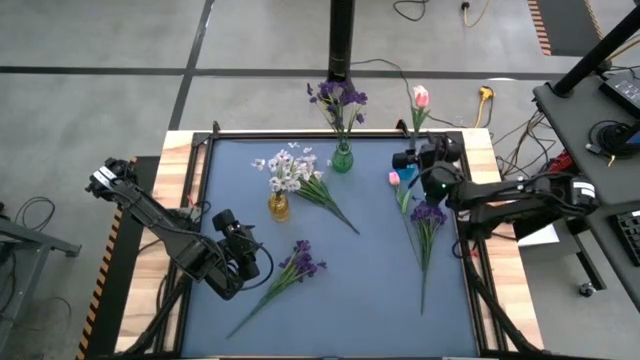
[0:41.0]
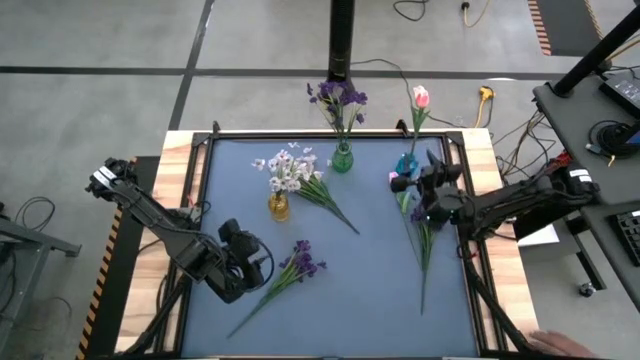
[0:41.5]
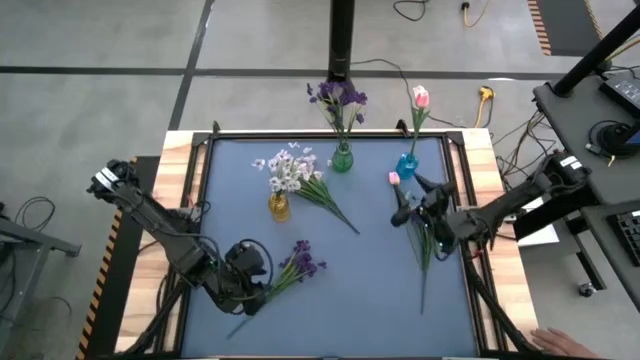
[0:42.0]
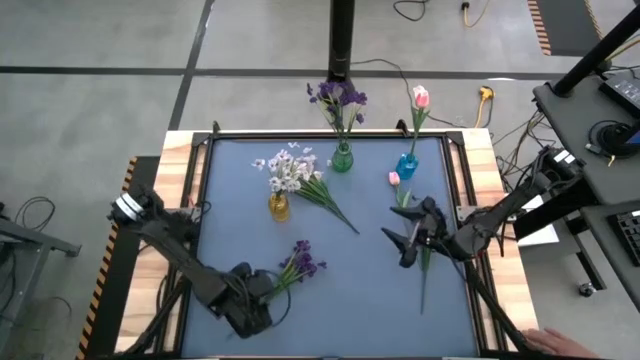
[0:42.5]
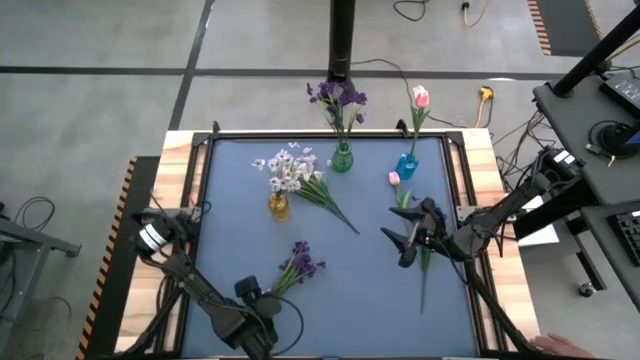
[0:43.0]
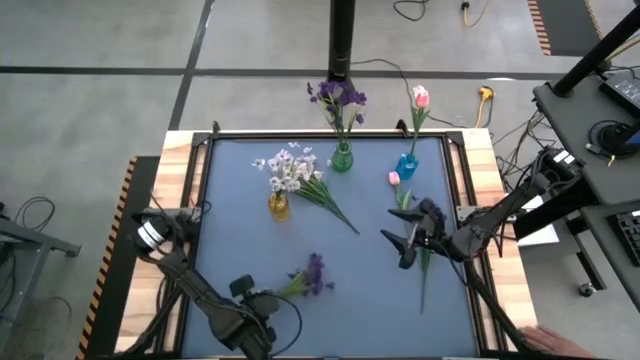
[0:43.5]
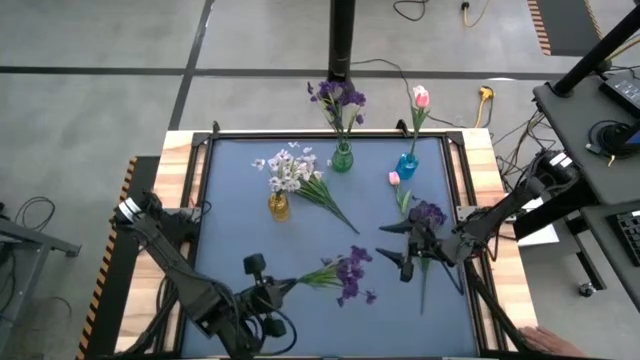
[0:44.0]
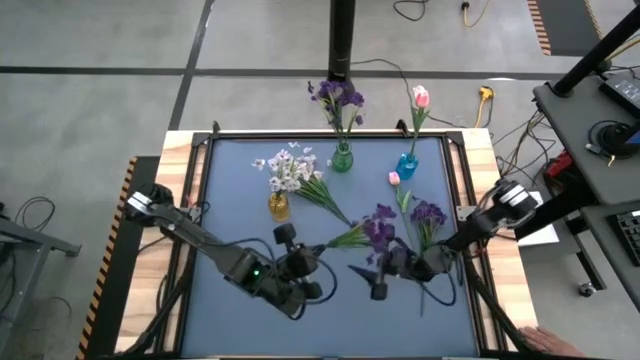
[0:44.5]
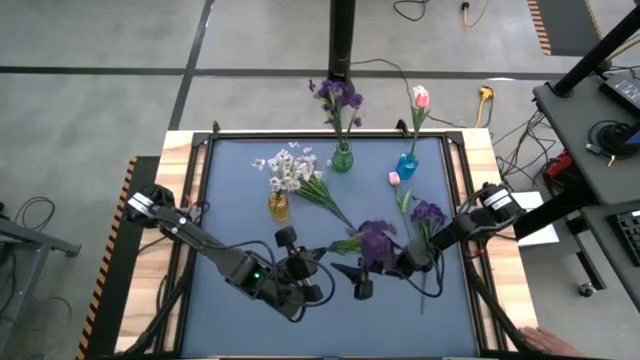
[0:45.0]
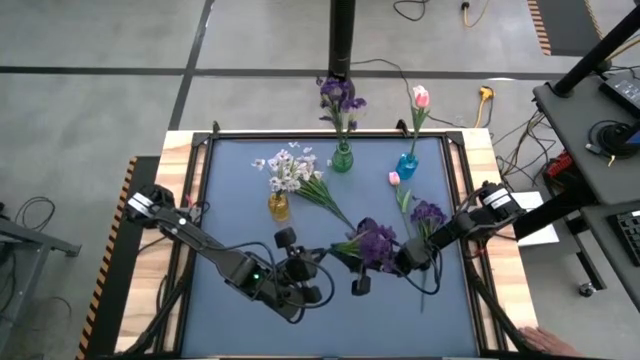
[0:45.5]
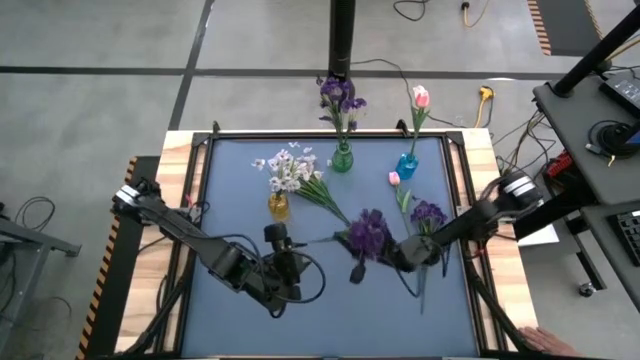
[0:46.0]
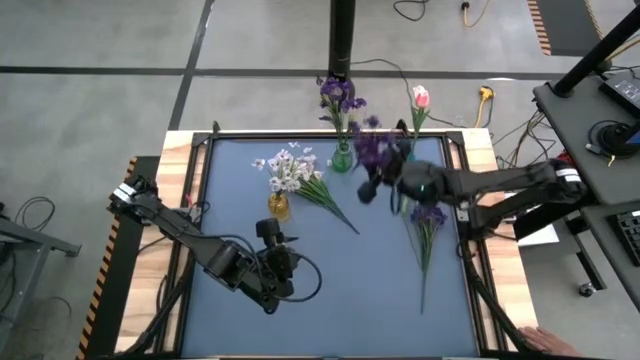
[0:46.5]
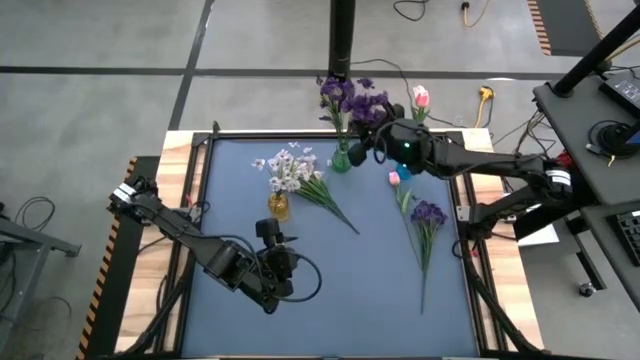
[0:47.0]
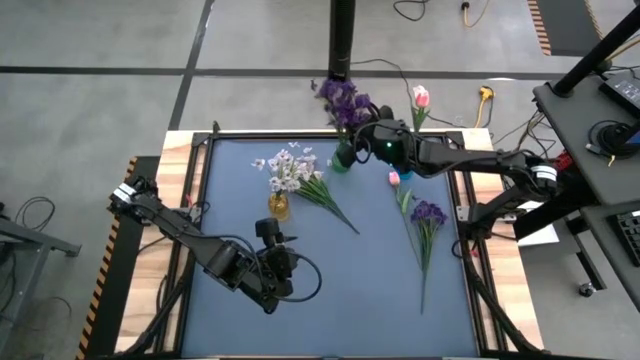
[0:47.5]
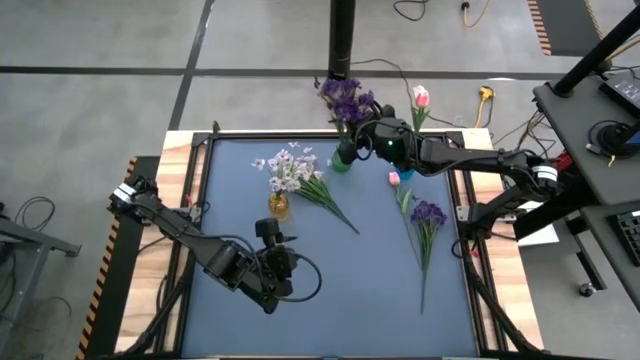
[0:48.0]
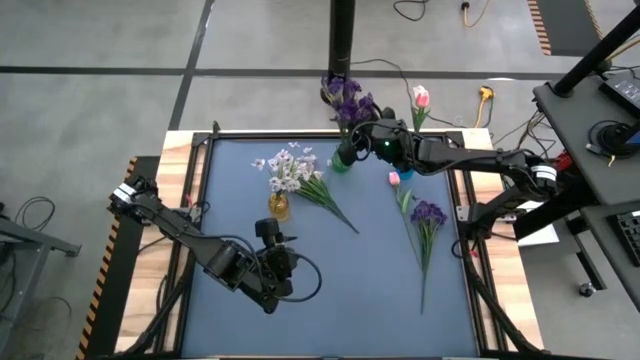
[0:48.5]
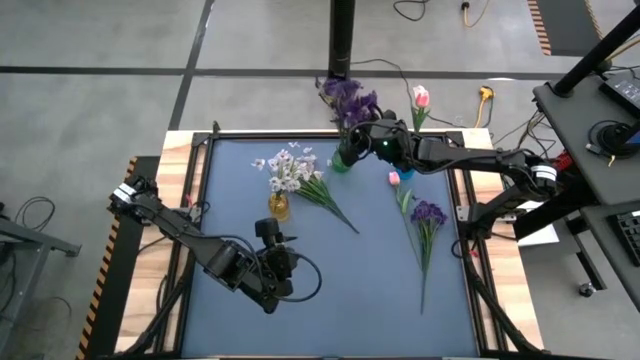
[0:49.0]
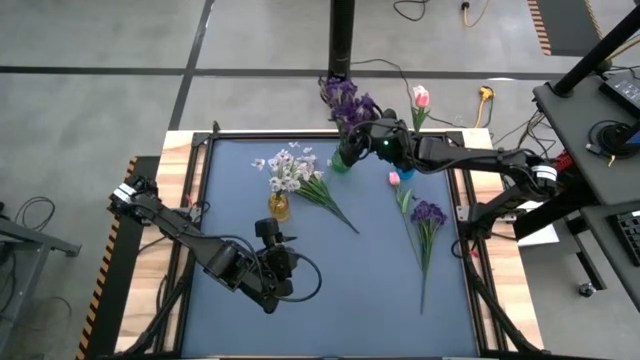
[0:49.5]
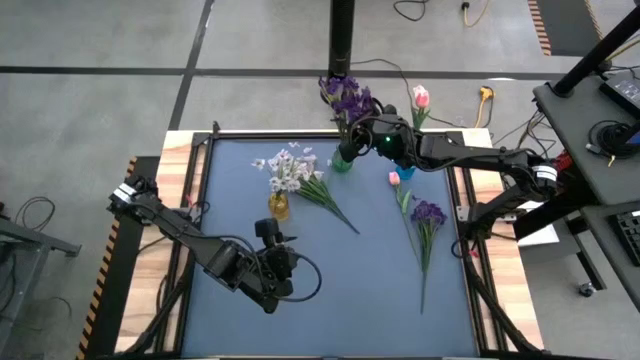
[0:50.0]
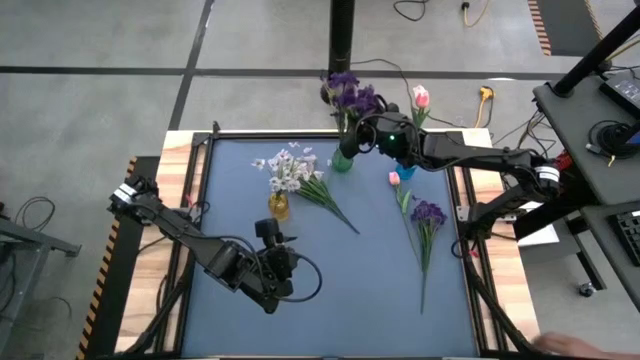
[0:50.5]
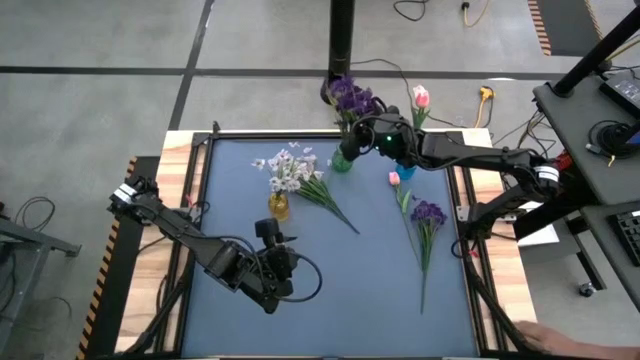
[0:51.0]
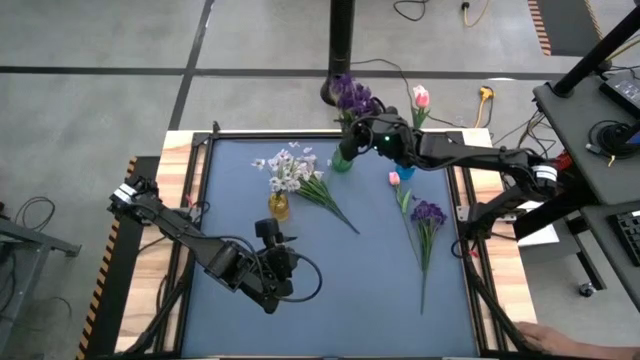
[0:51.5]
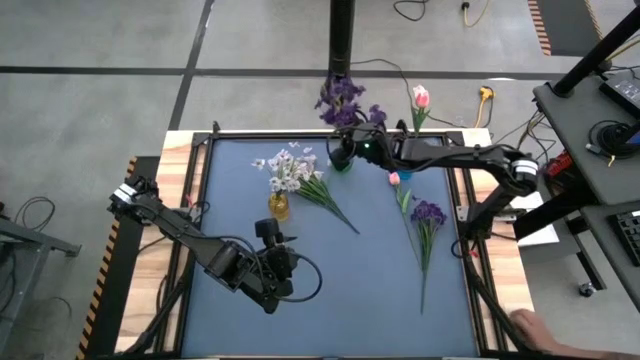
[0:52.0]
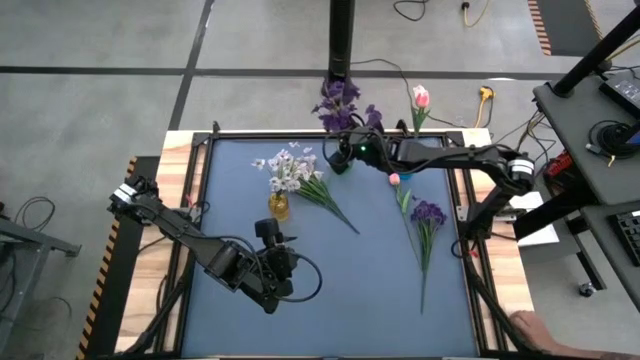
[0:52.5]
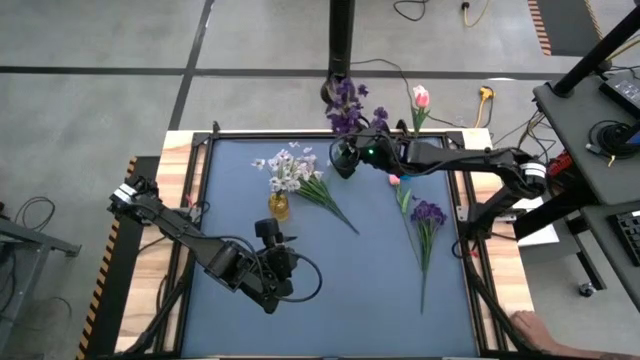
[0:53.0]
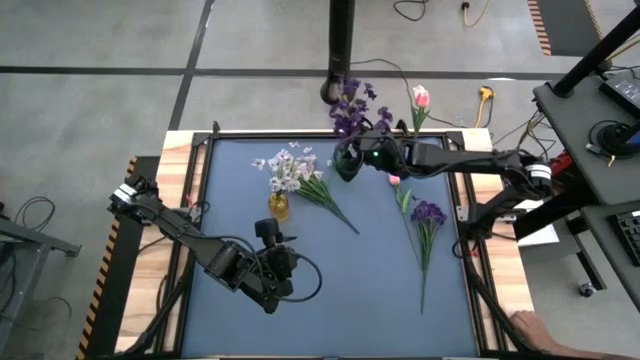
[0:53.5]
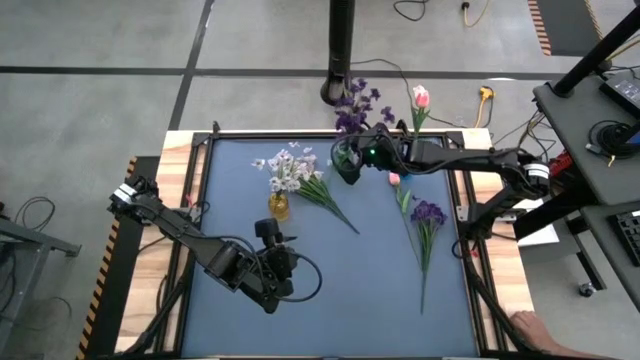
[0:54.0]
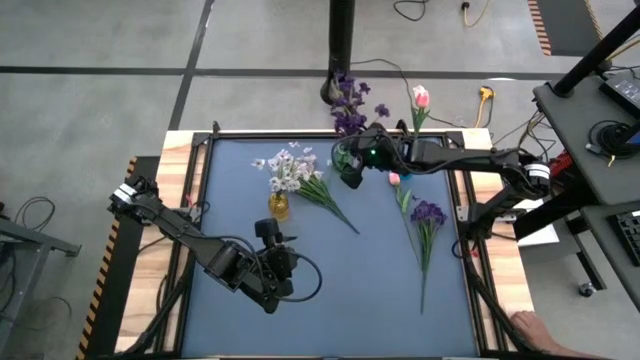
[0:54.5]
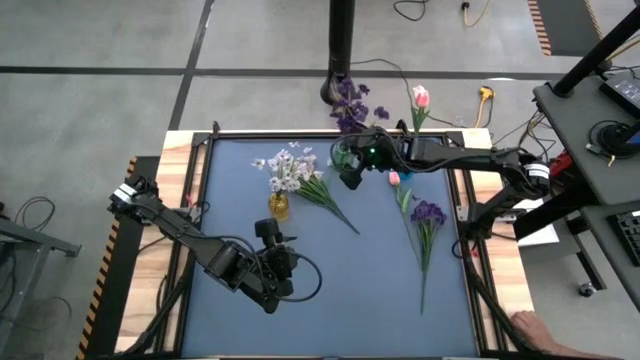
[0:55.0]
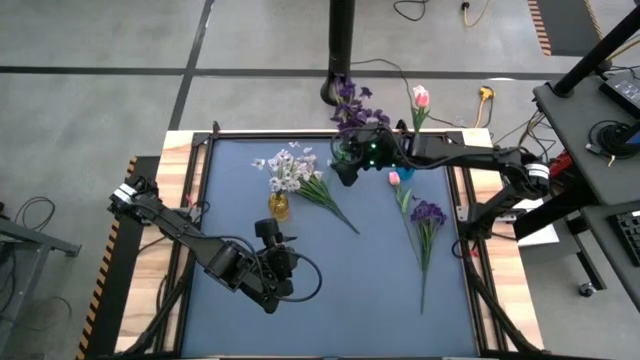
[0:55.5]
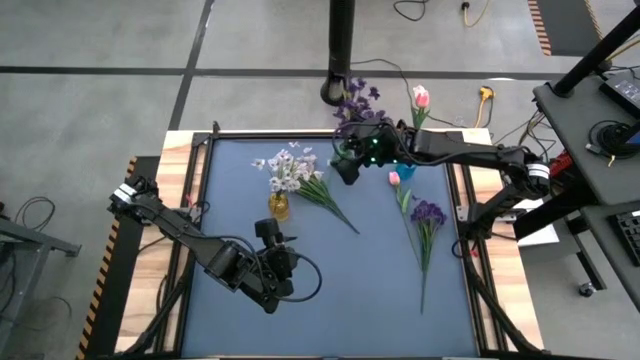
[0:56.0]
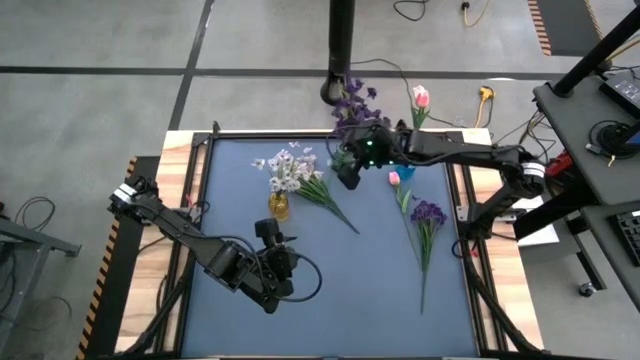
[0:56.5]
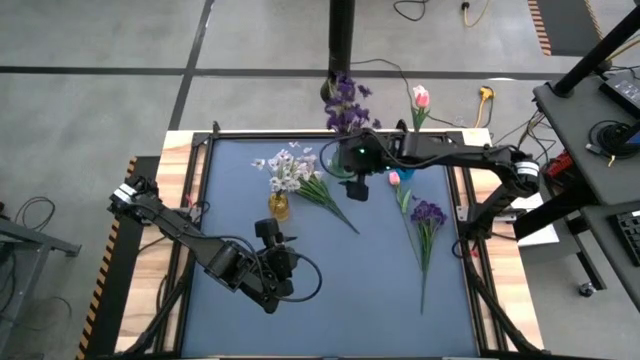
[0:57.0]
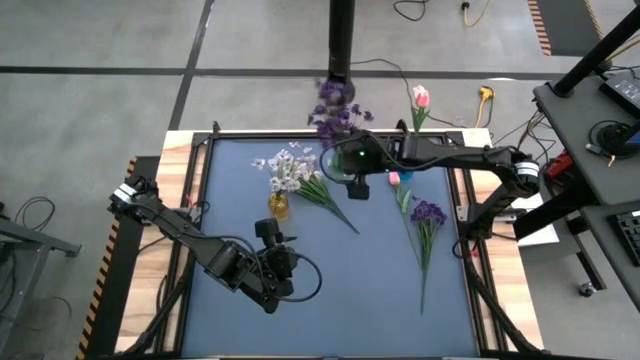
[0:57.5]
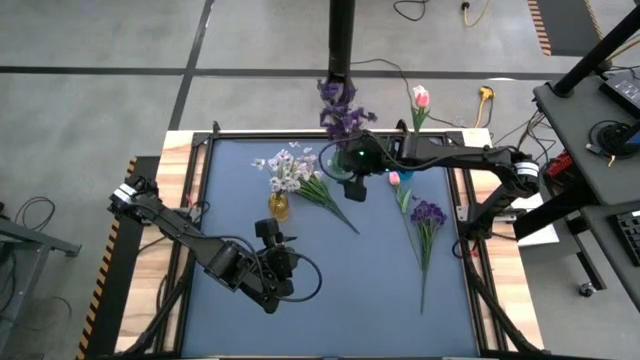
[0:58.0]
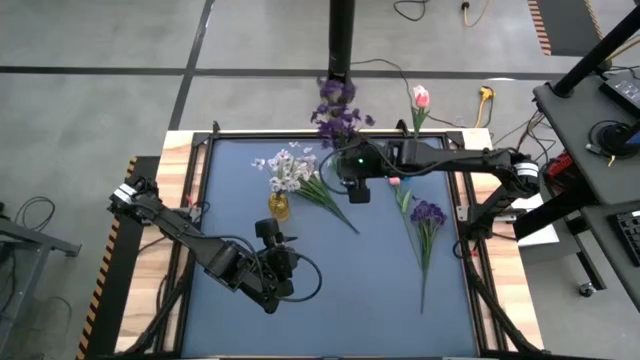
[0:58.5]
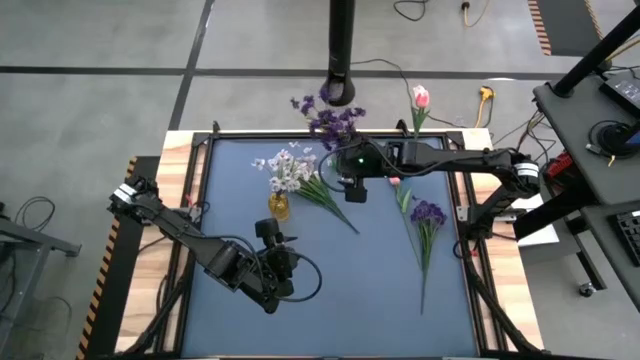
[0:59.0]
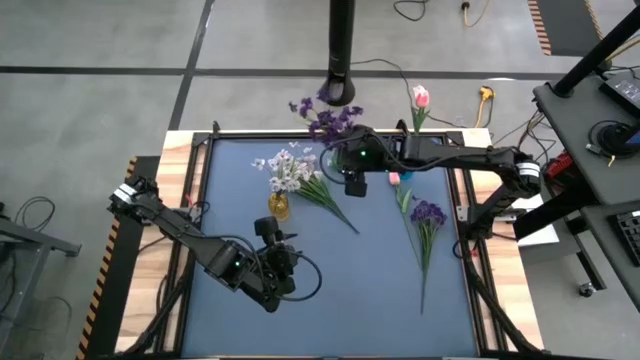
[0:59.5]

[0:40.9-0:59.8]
Task: Sort flowers into vase by color
Put the left purple flowers into the green vase
